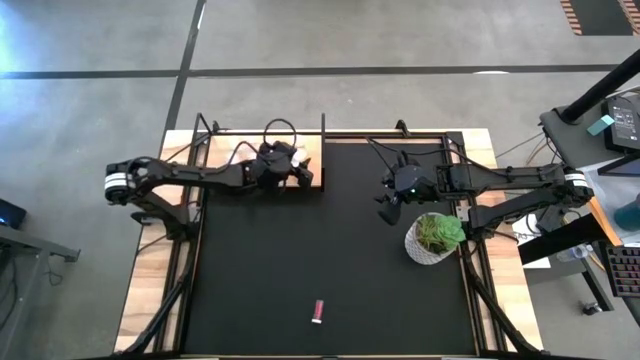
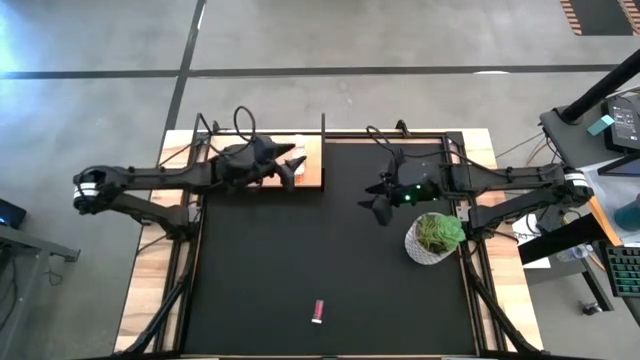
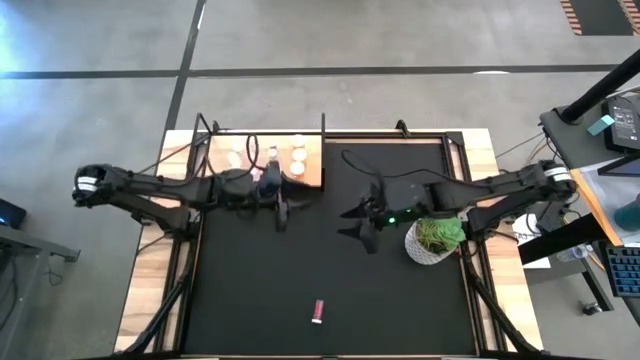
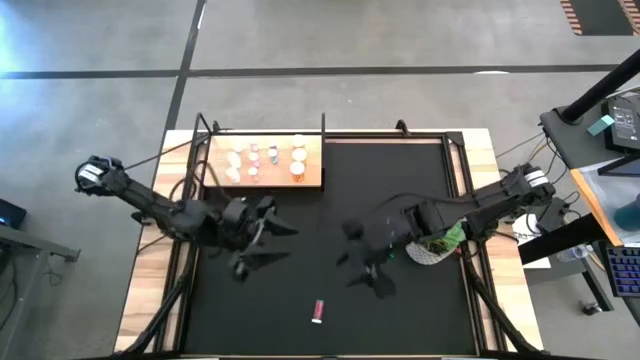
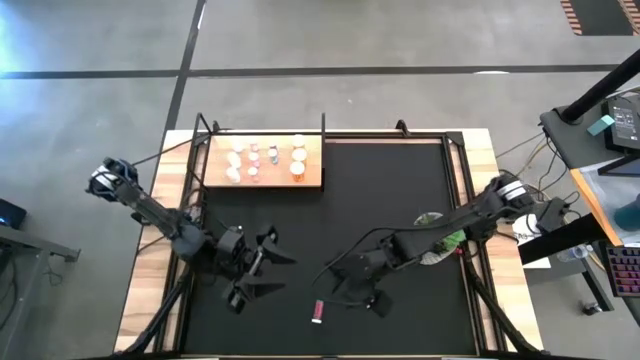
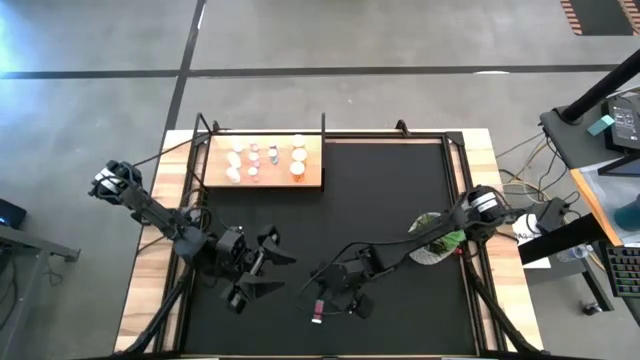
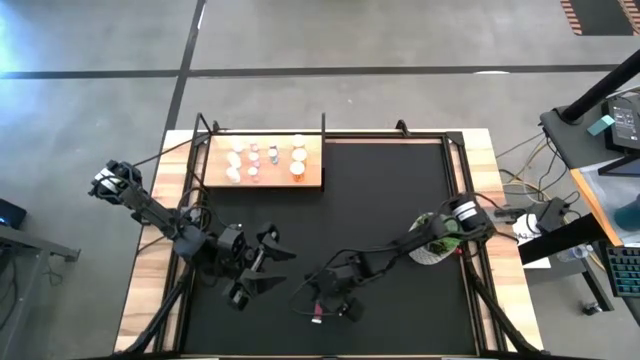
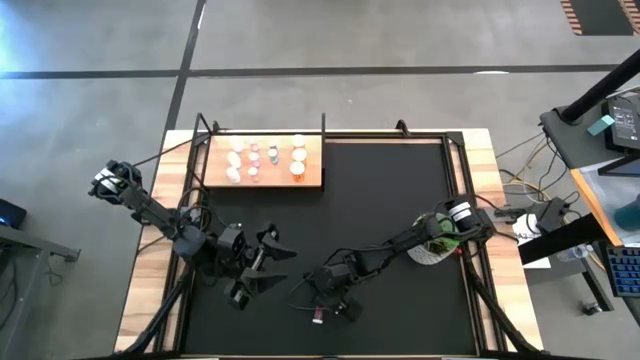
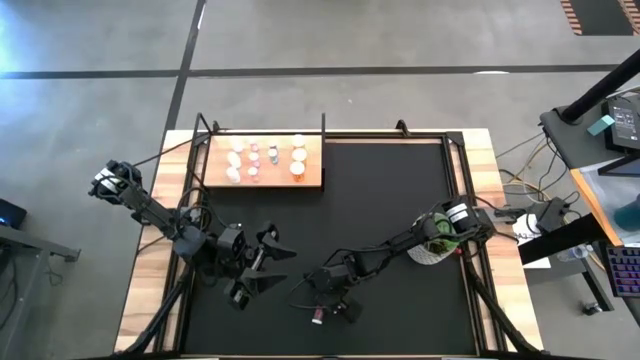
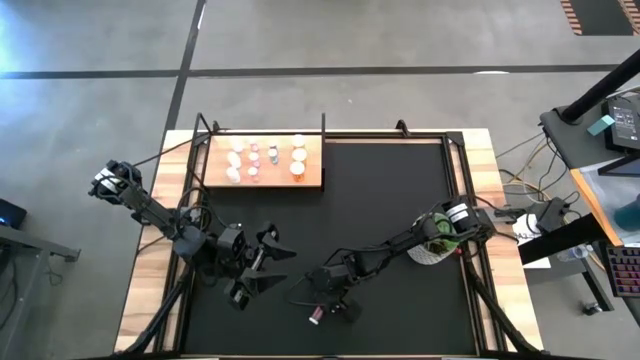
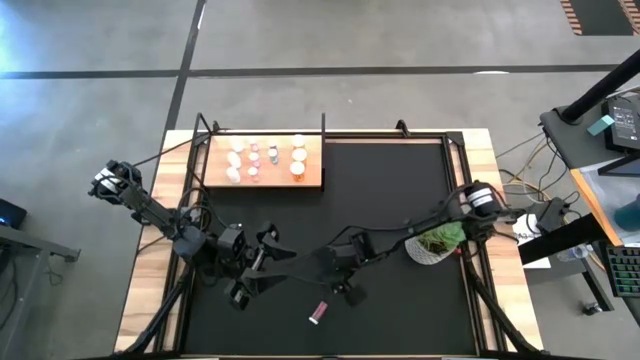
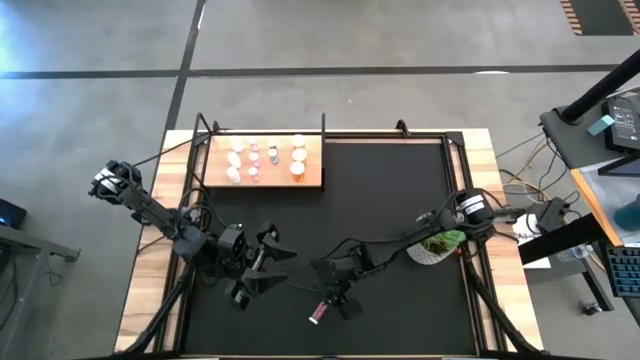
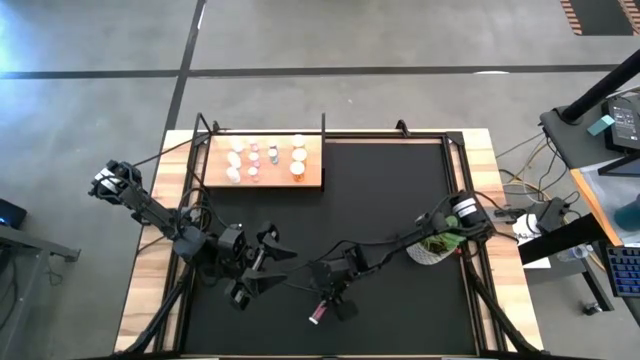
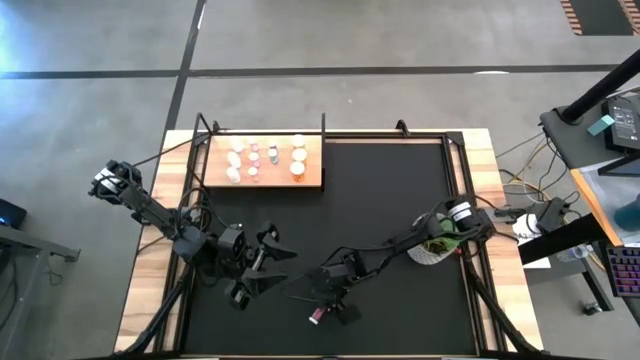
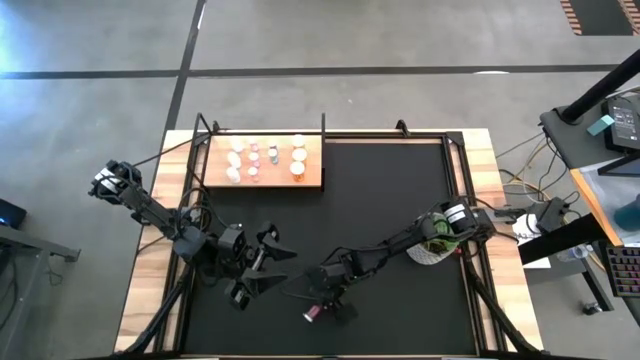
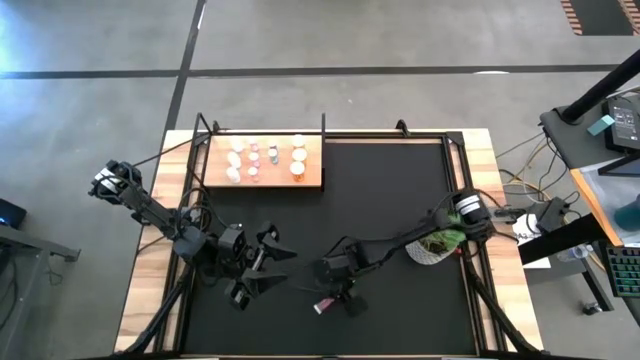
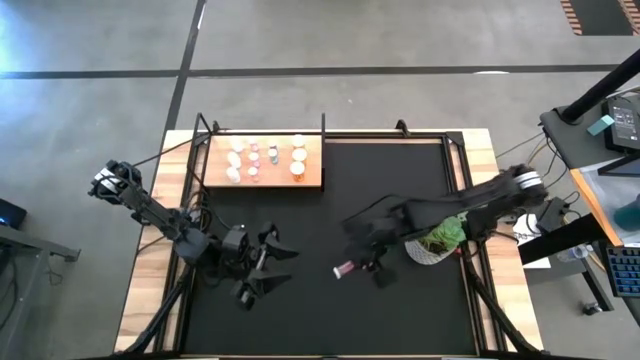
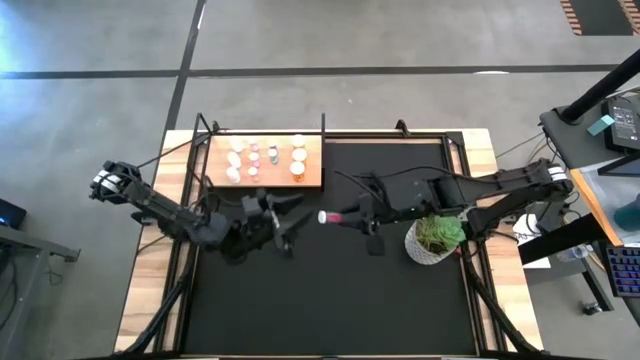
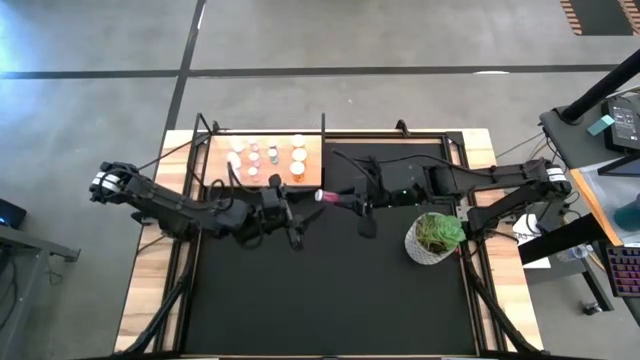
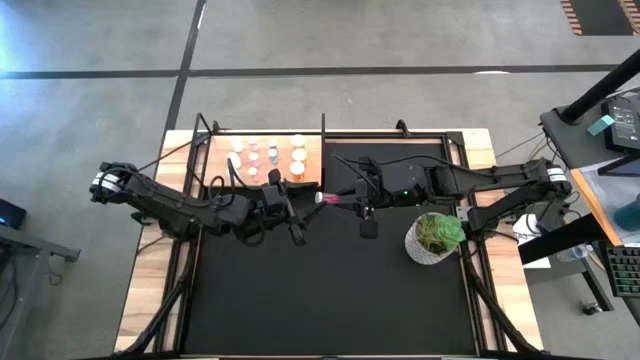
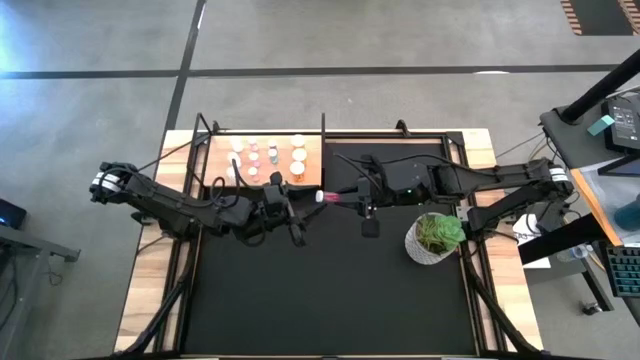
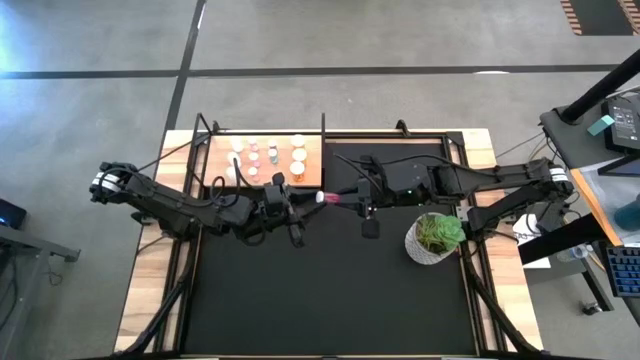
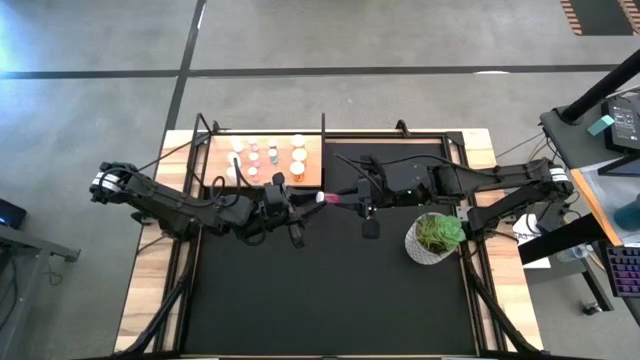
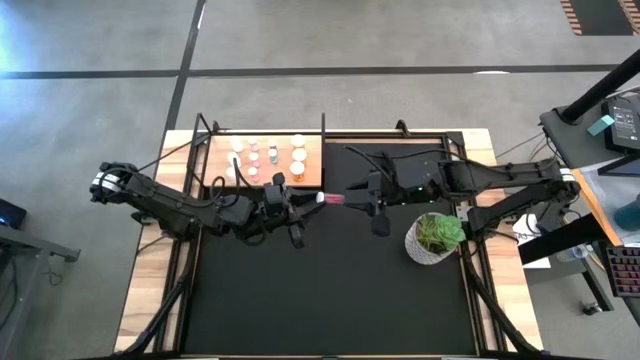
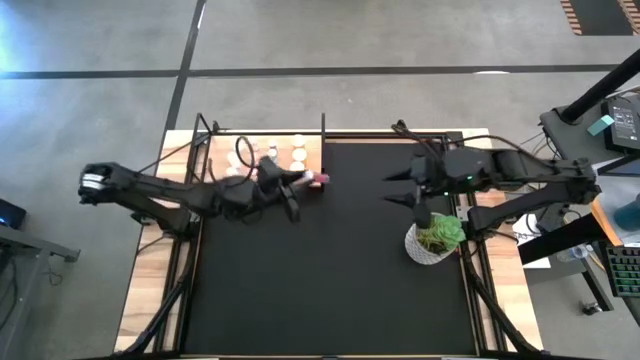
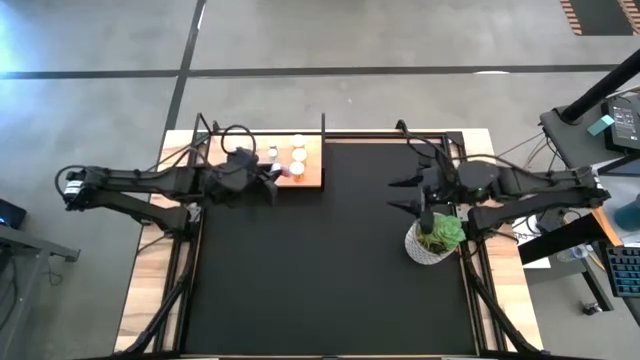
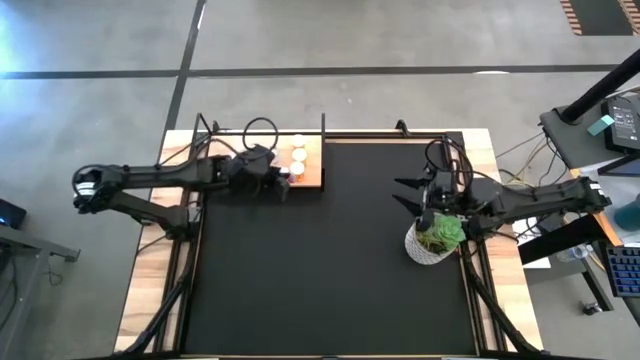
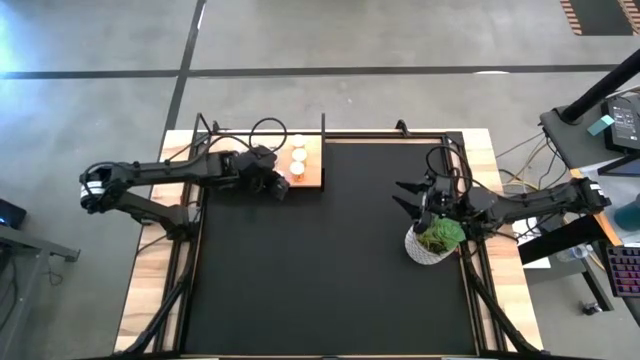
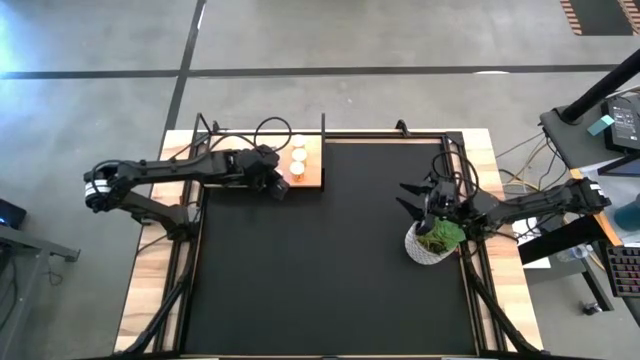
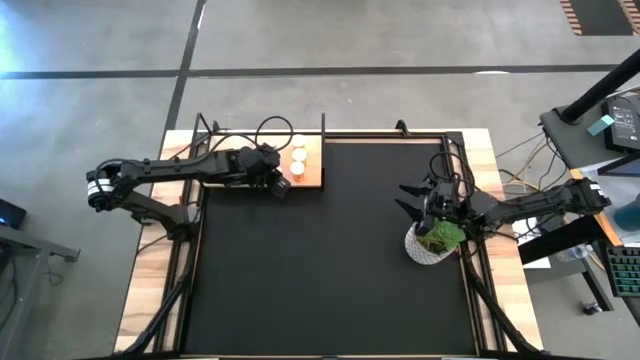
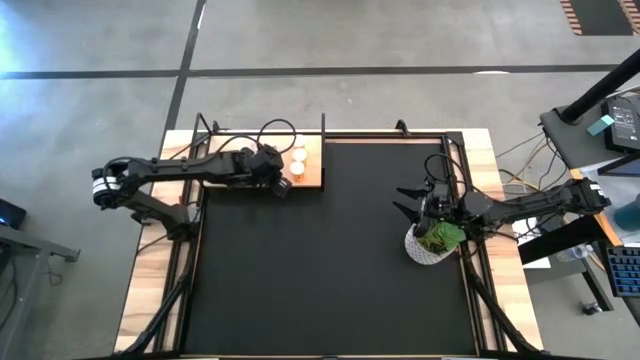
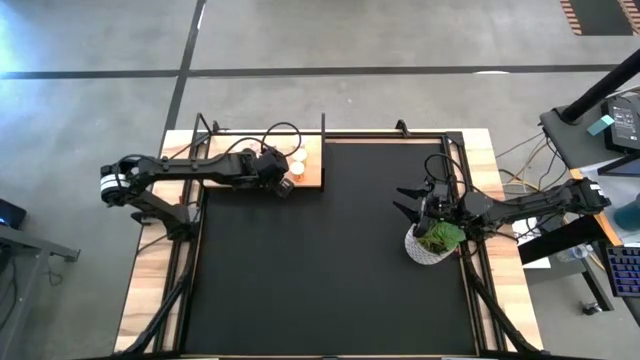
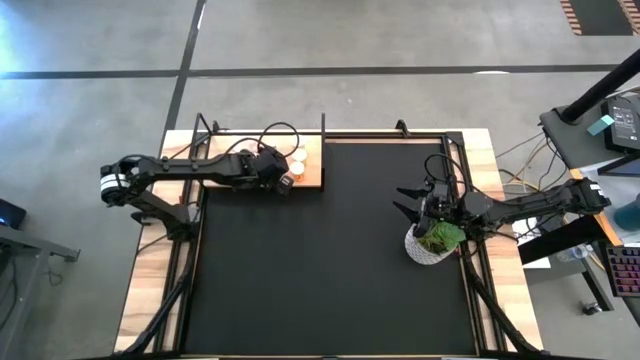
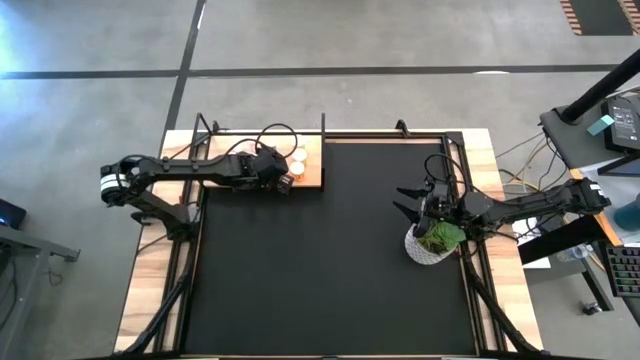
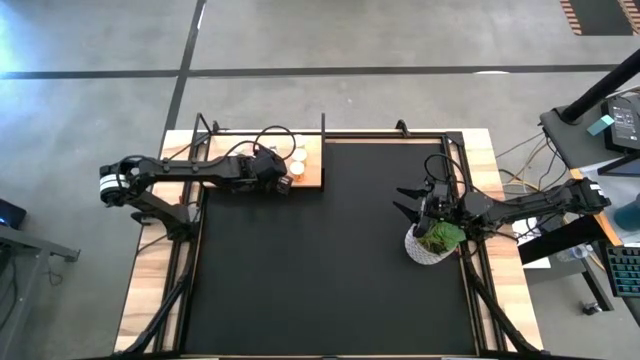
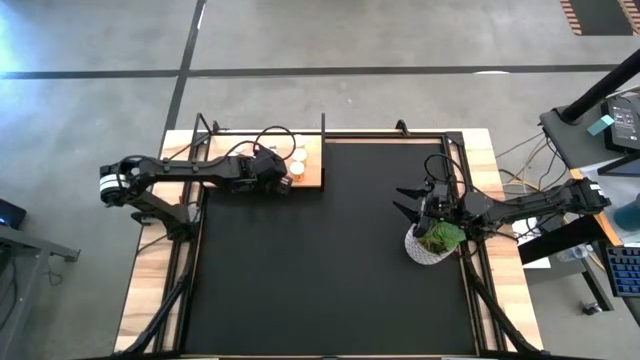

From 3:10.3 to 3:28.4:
Task: Pick and place medicine bottles onto shelf by color
Put the blue pill bottle into the shelf

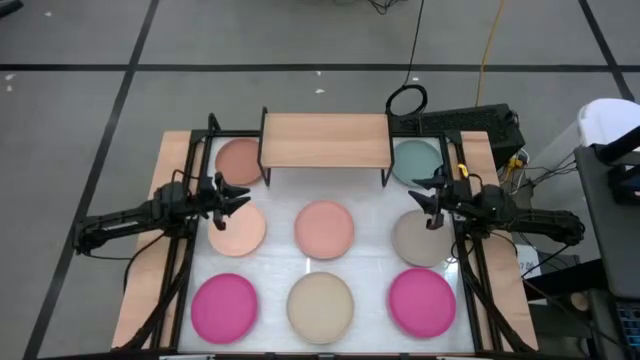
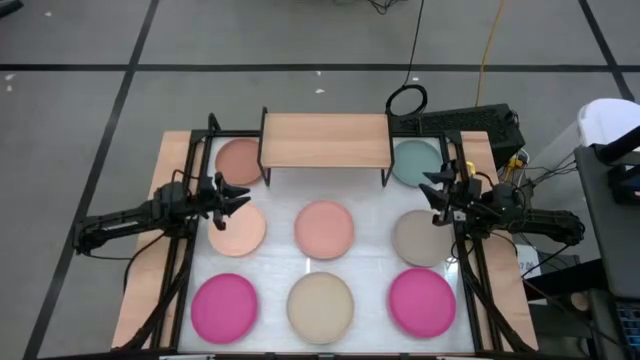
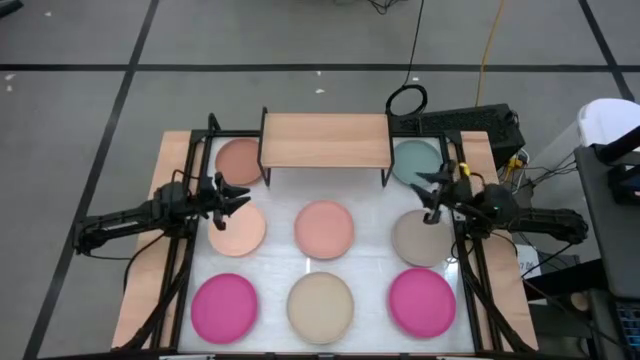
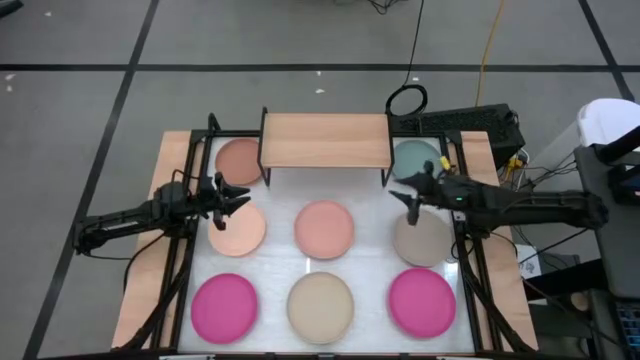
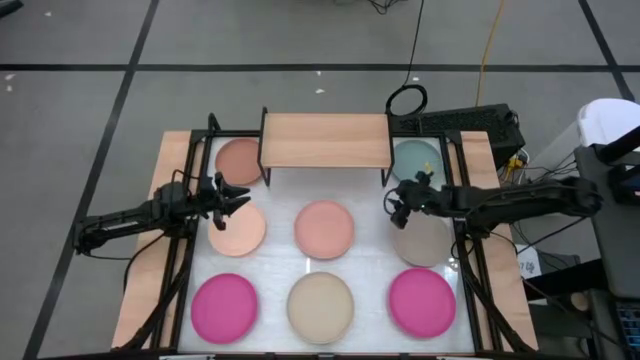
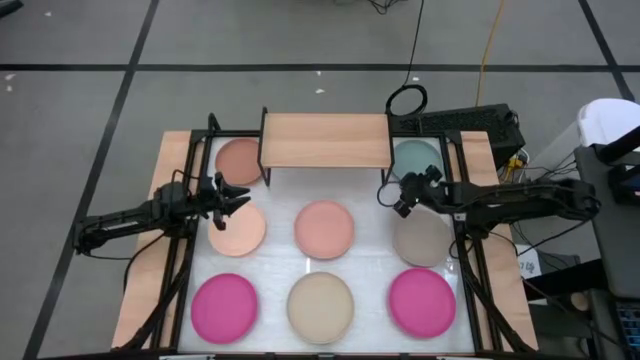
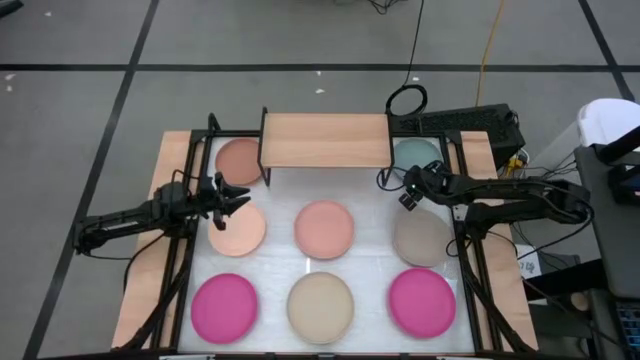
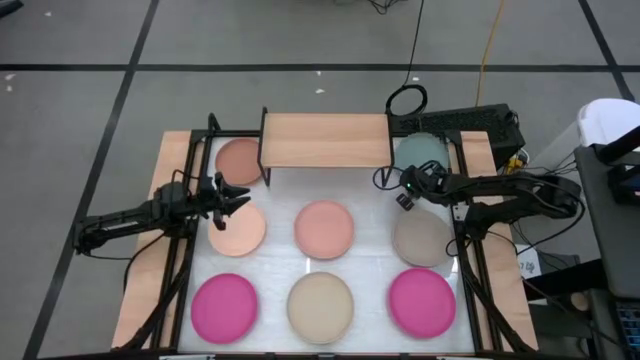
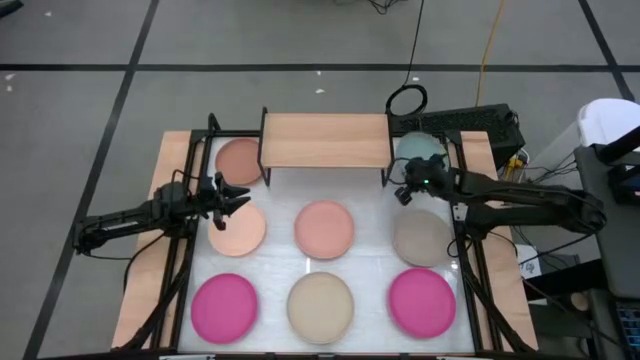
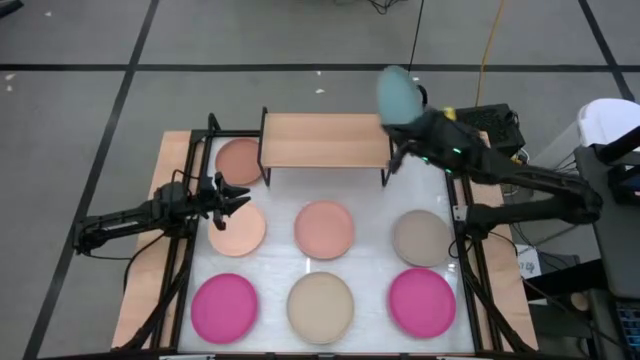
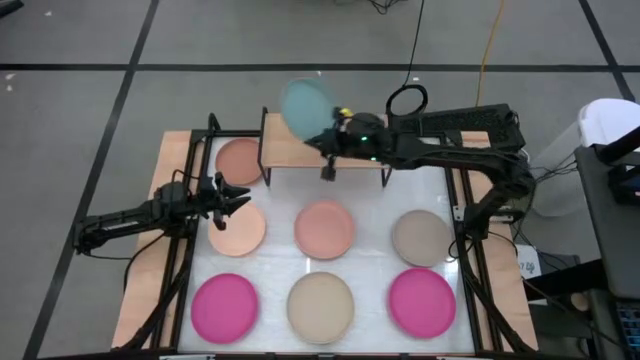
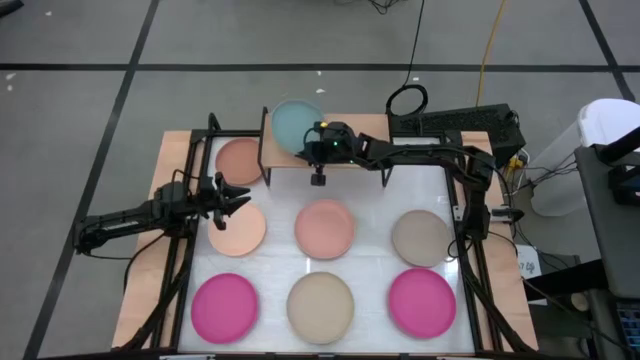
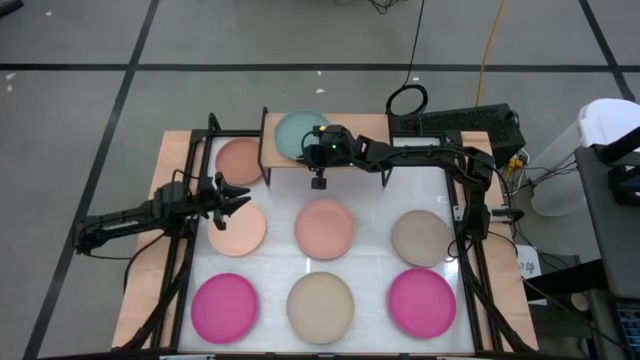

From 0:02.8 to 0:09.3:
Task: Place and stack plates onto a shelf
Put the light blue plate on the shelf
